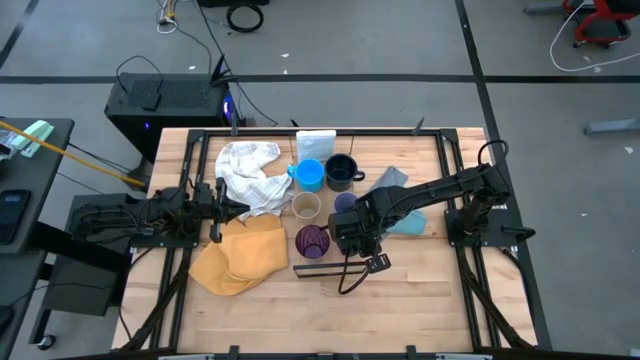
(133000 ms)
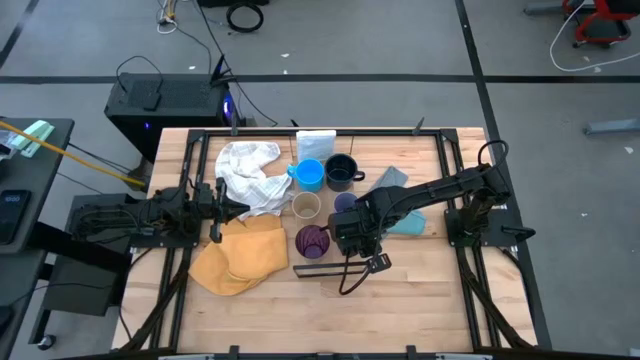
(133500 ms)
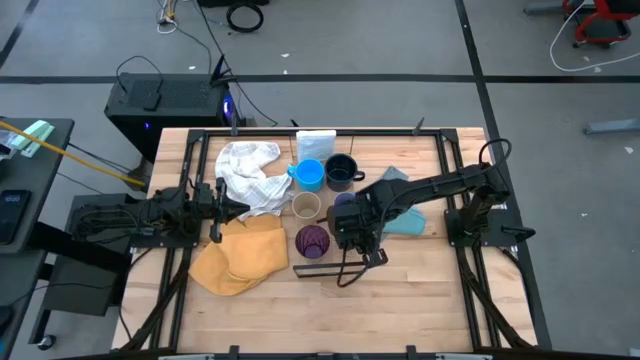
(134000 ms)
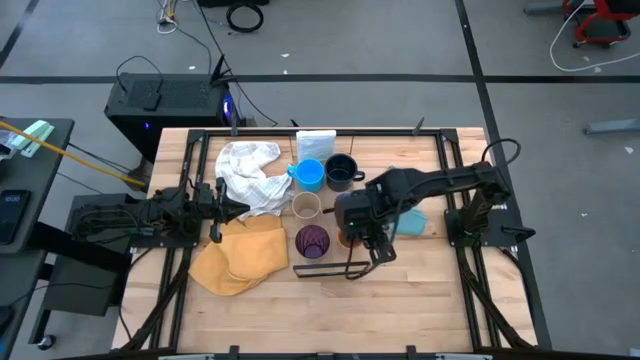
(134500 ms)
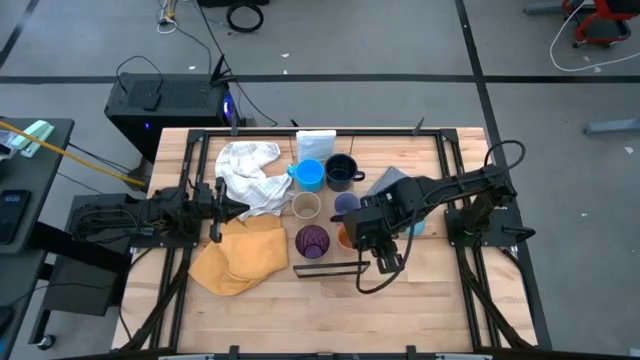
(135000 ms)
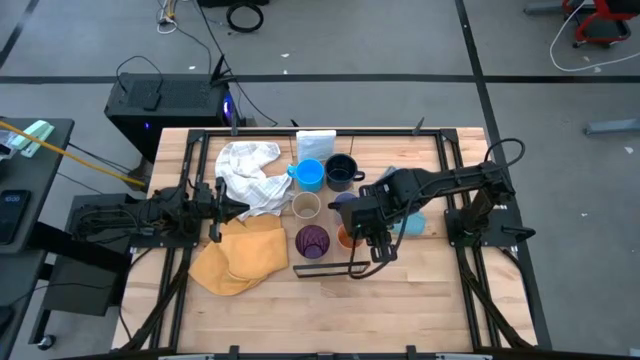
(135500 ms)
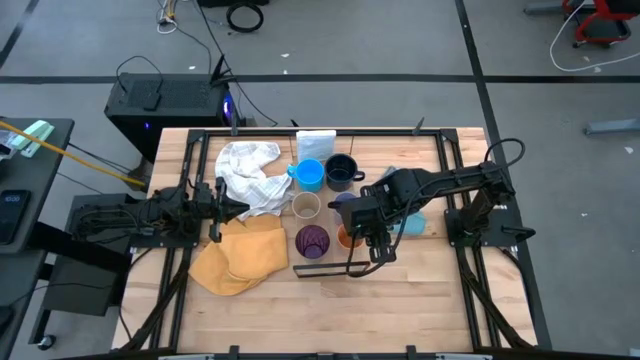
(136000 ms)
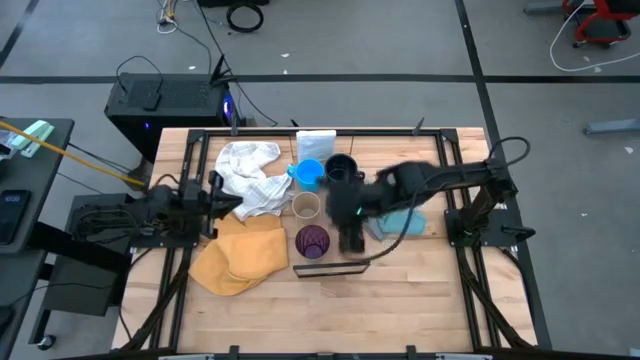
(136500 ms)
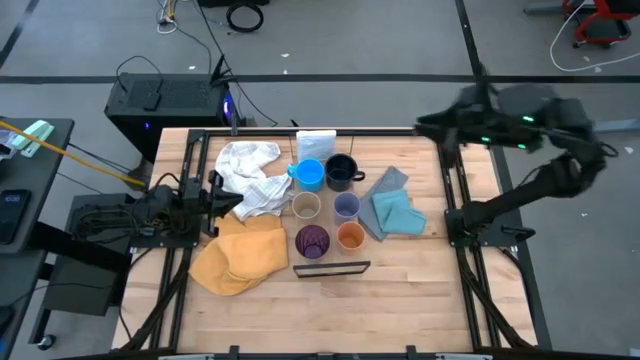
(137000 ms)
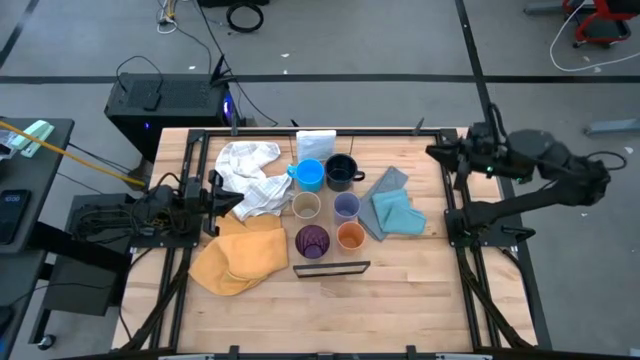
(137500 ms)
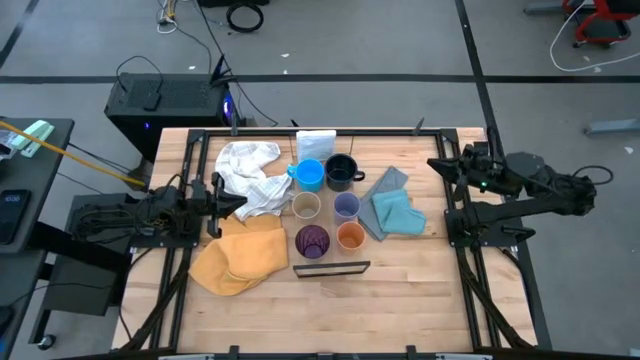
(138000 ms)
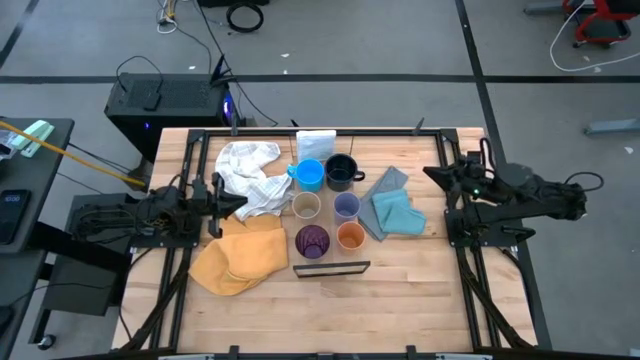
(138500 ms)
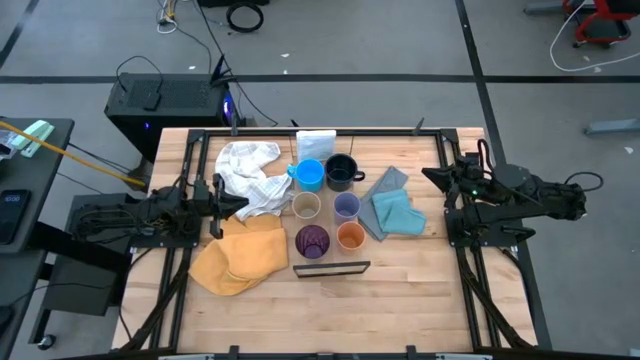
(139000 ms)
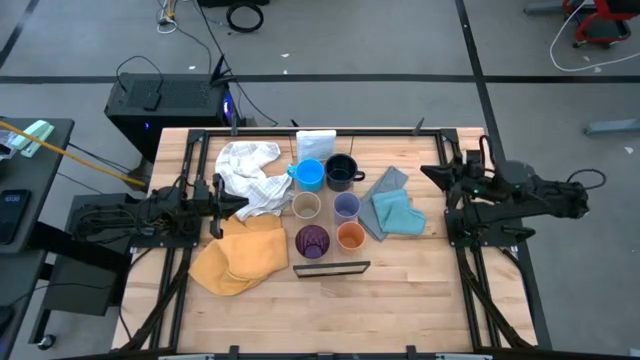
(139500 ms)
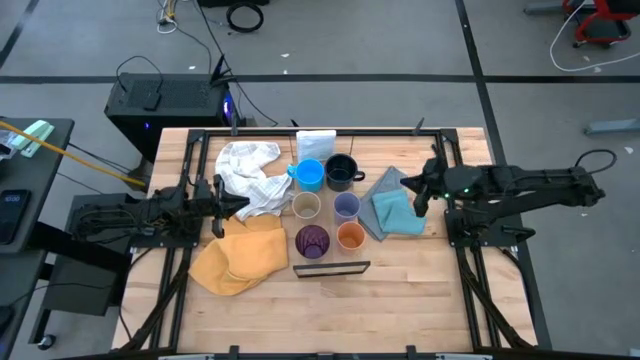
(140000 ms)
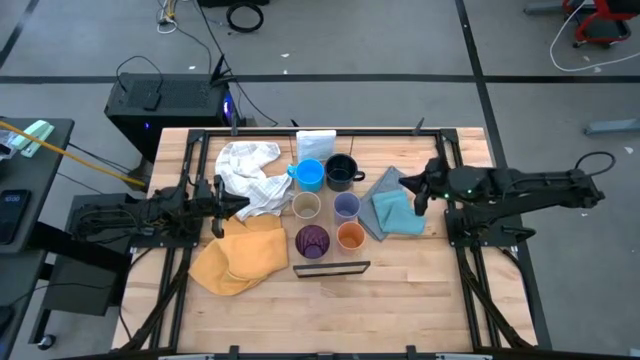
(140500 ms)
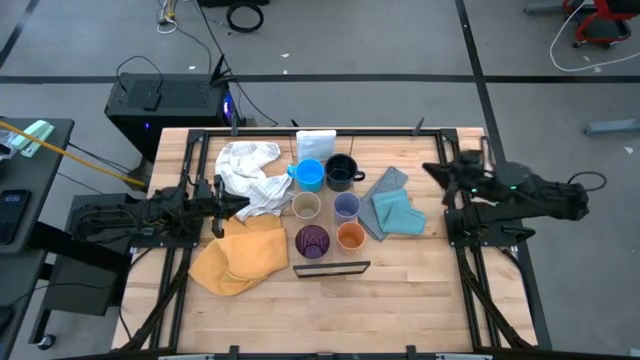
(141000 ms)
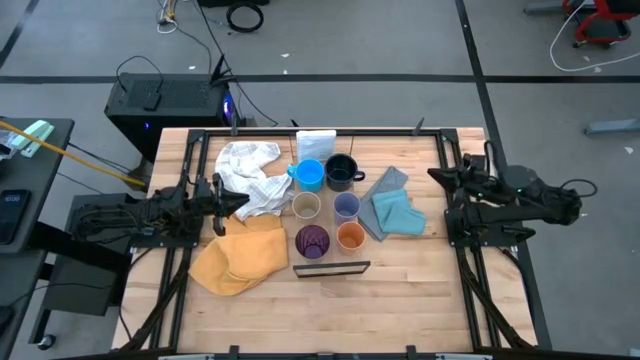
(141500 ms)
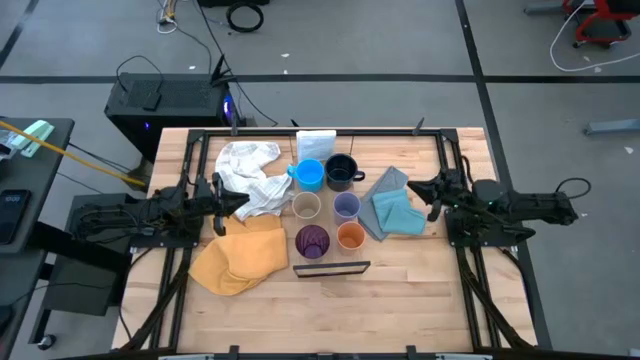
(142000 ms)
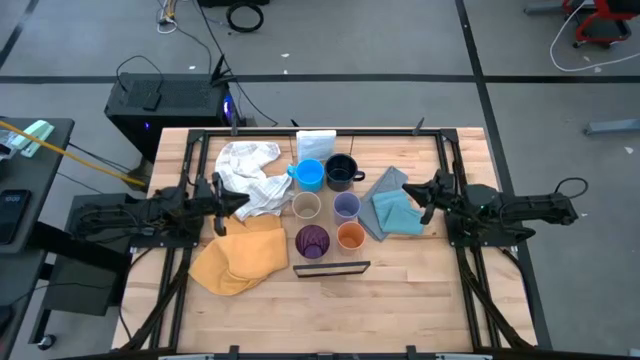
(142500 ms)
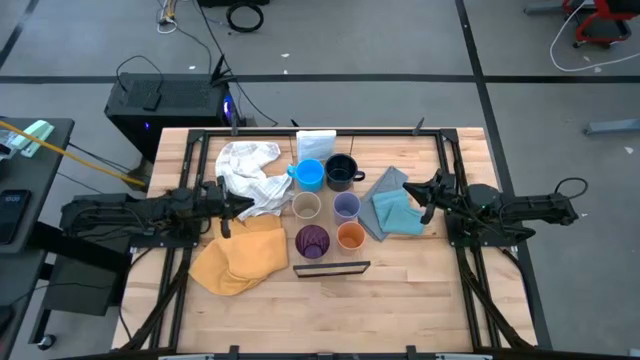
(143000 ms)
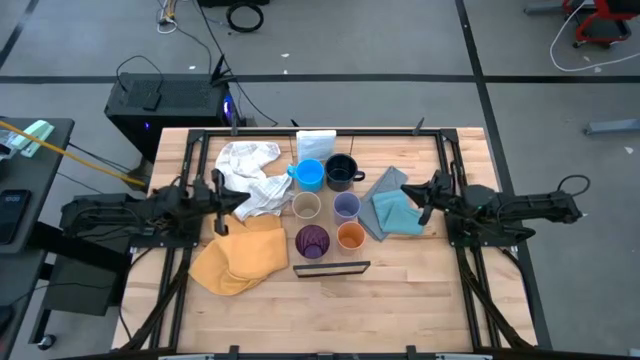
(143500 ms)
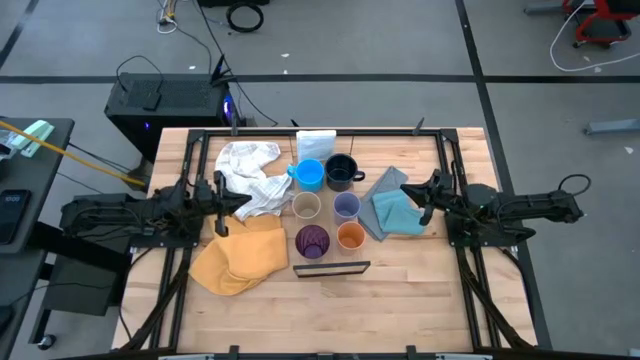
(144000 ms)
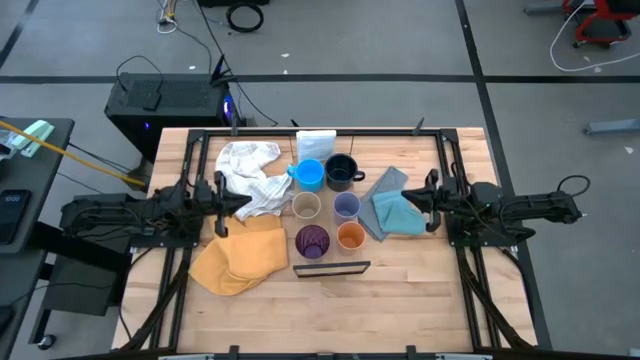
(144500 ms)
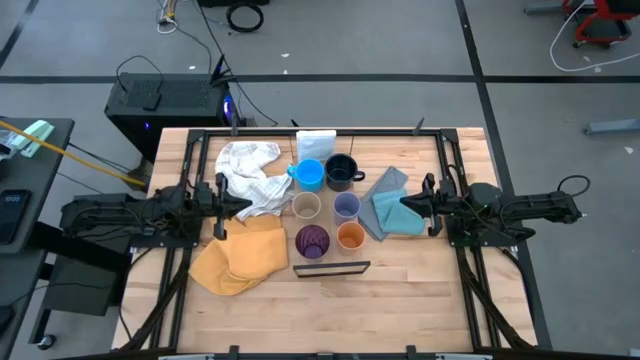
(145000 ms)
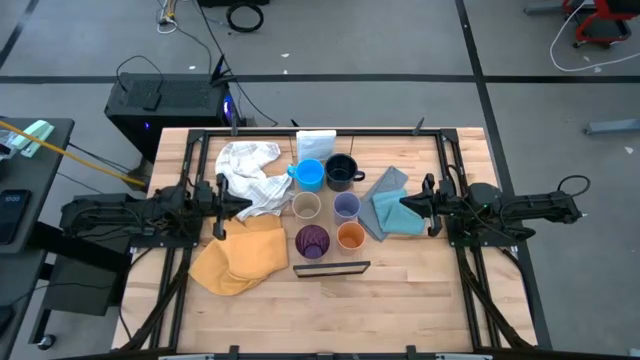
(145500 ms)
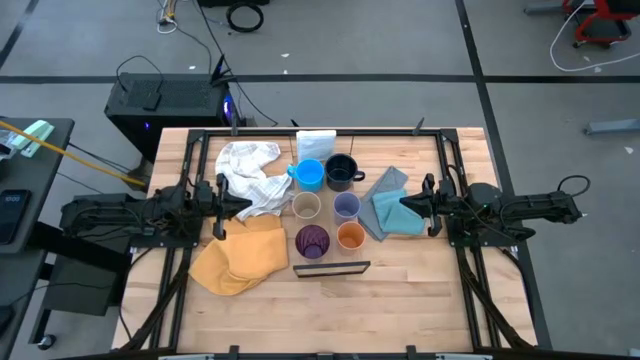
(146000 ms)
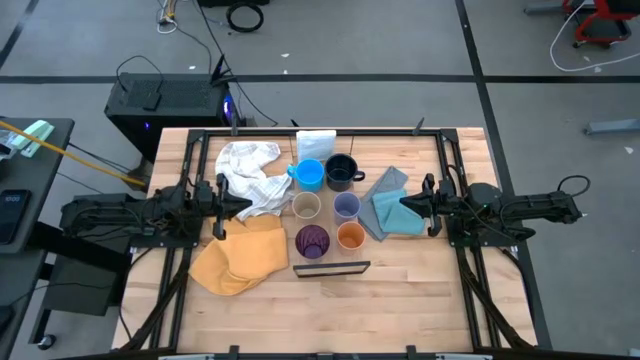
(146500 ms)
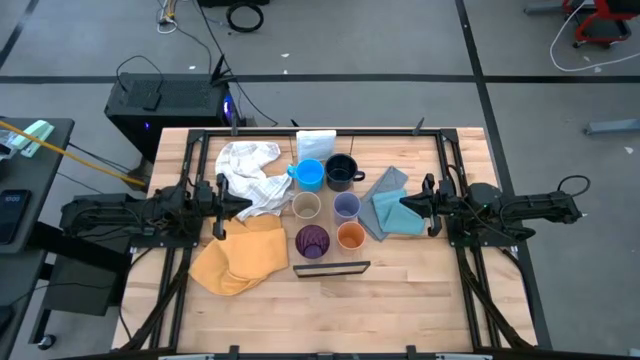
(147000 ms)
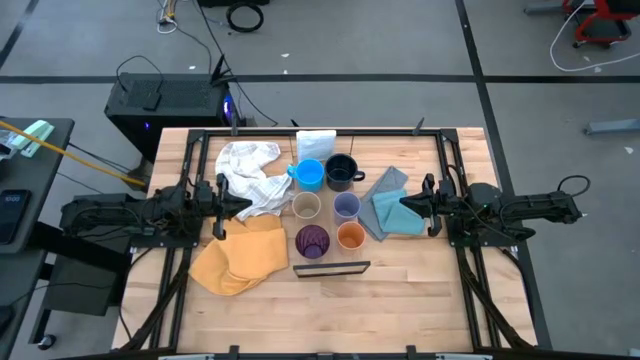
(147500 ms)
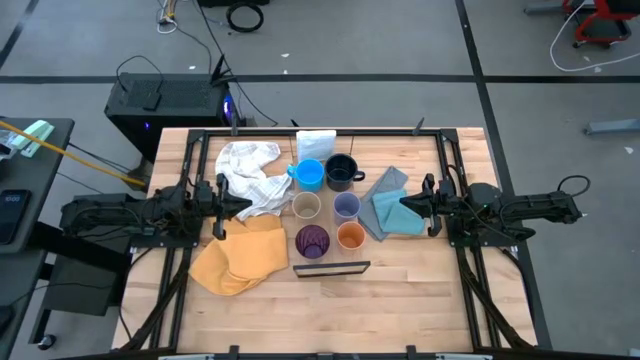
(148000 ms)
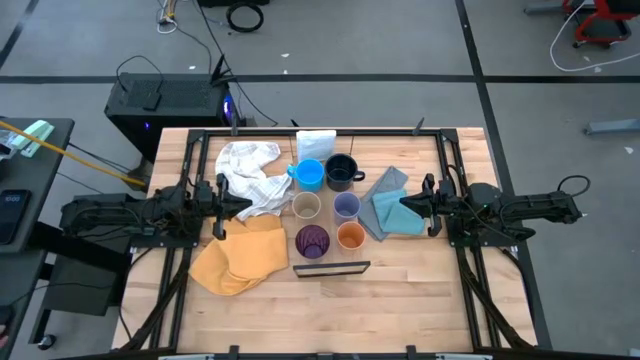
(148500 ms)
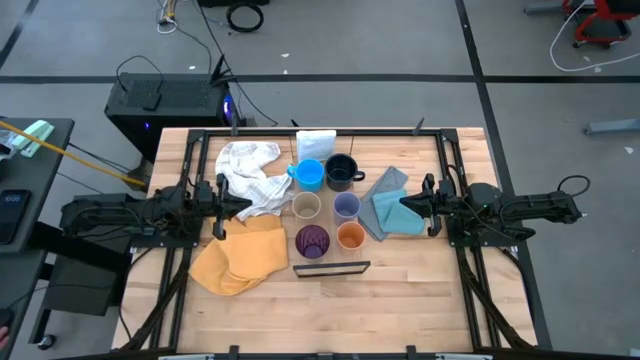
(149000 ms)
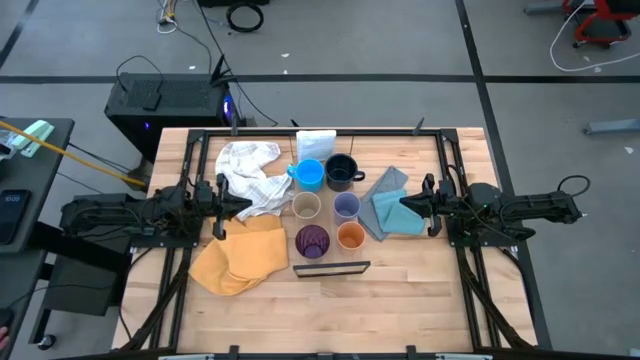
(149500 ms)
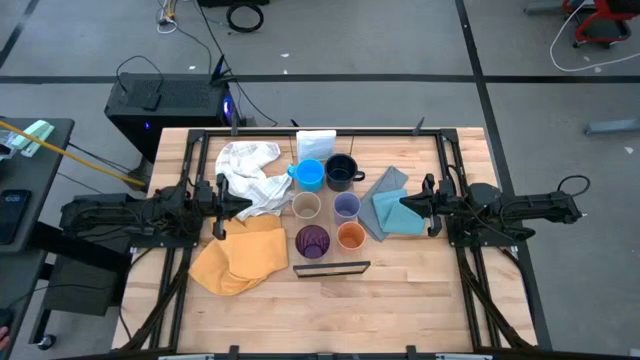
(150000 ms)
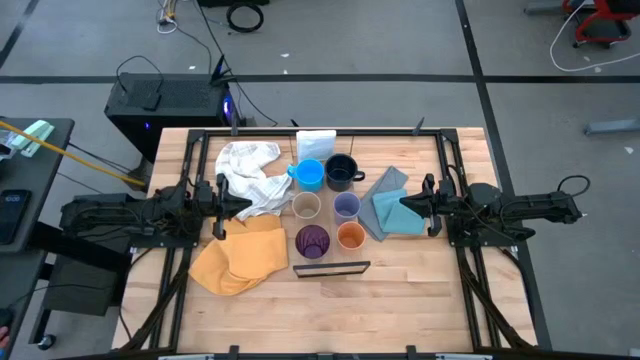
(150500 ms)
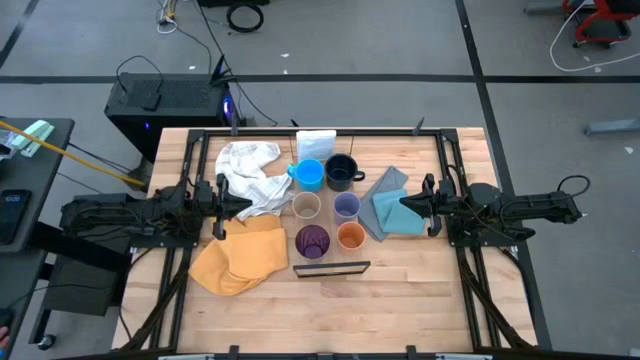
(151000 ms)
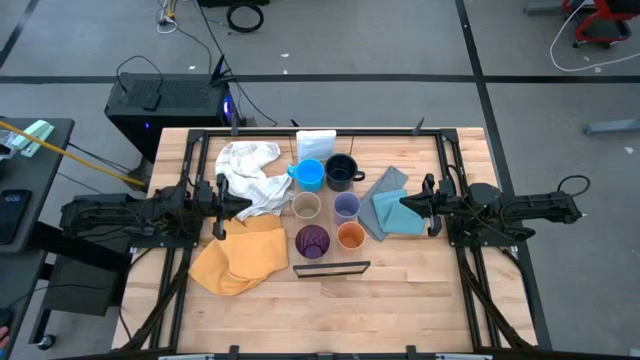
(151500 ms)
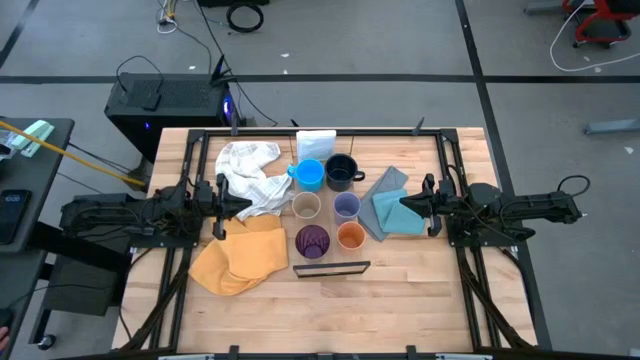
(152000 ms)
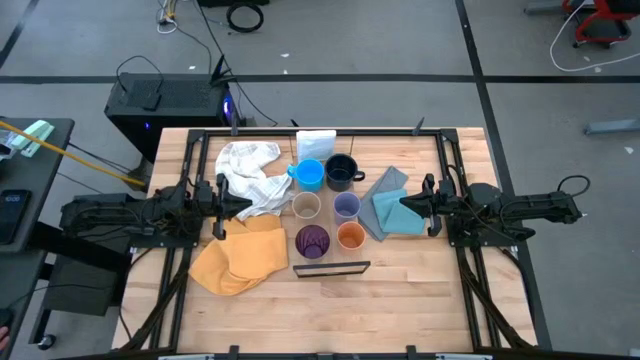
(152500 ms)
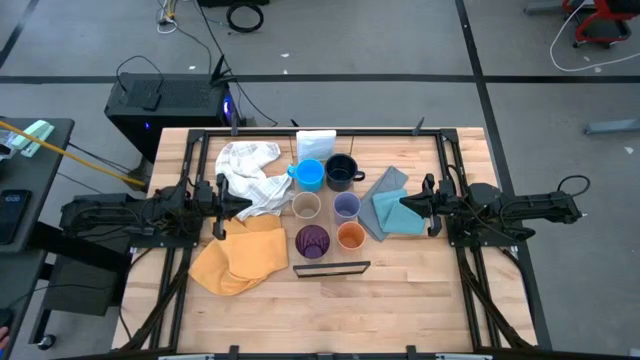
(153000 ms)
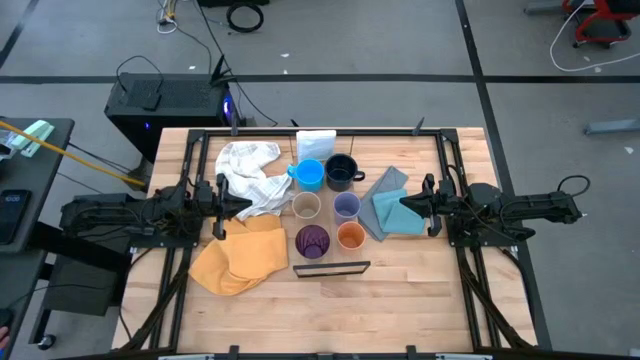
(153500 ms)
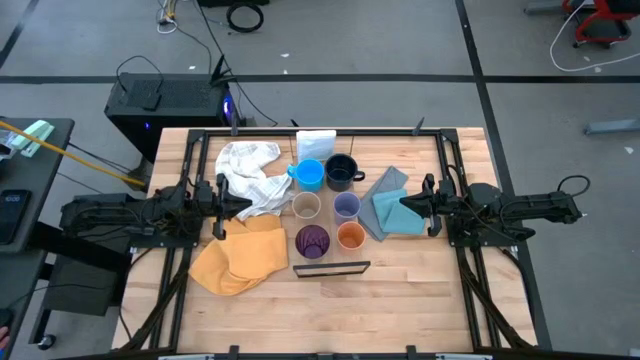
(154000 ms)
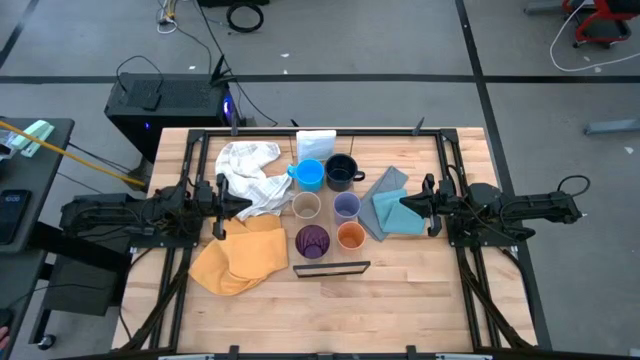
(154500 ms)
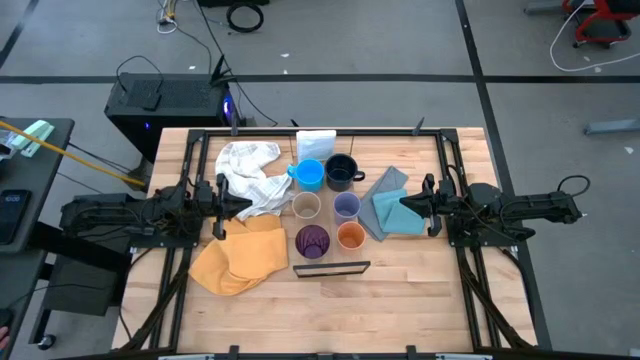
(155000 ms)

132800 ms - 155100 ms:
Task: Stack small to large cups/mugs on shelf
Return to Home Position
